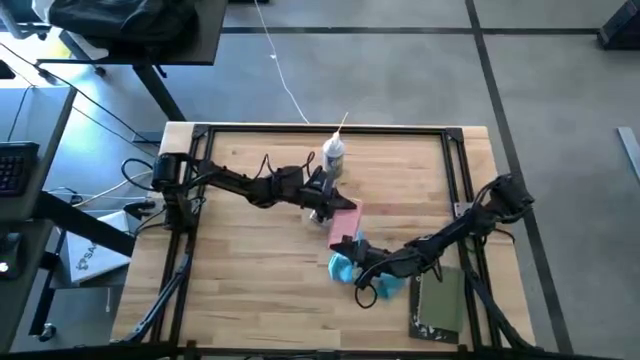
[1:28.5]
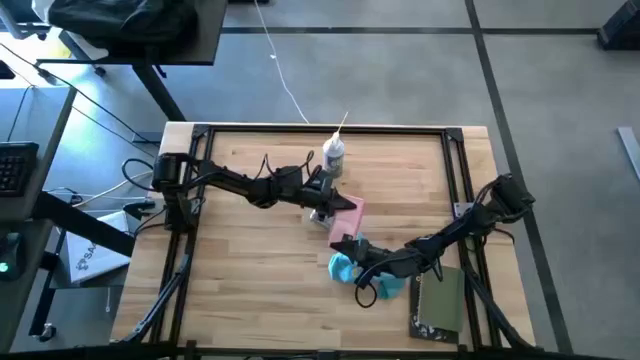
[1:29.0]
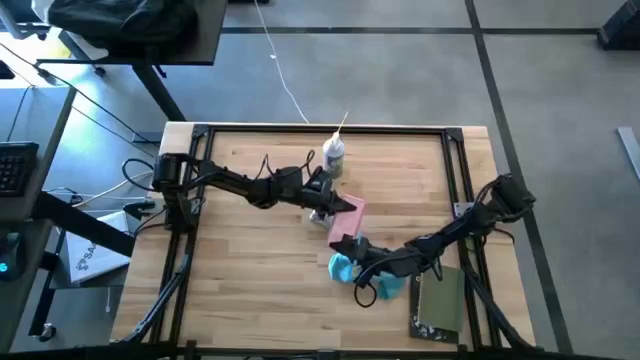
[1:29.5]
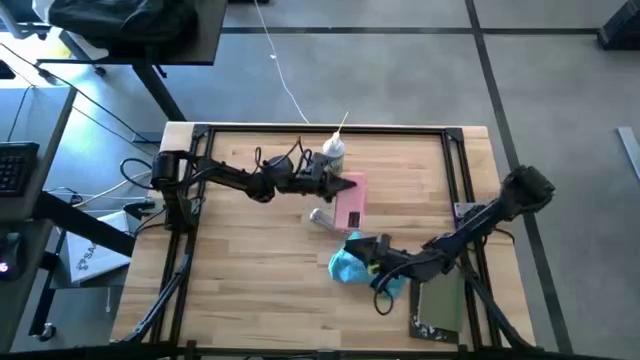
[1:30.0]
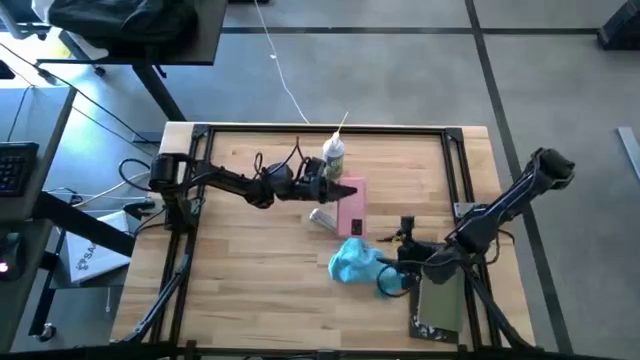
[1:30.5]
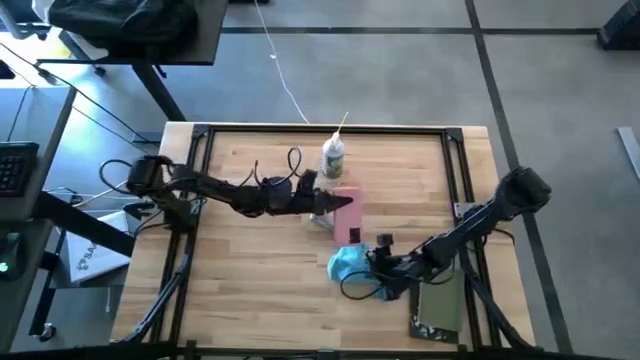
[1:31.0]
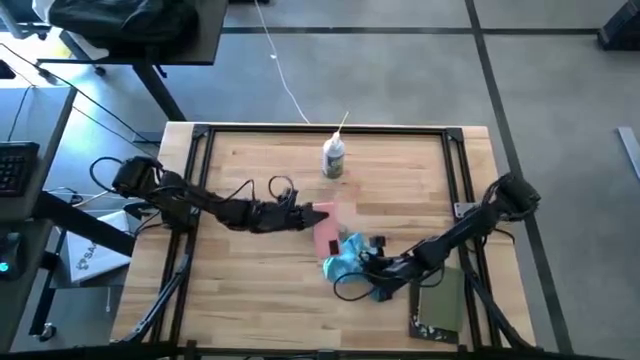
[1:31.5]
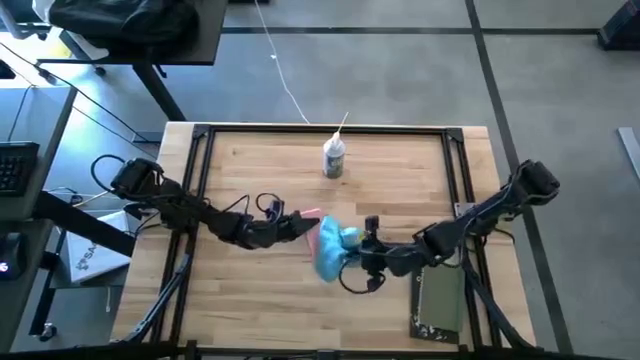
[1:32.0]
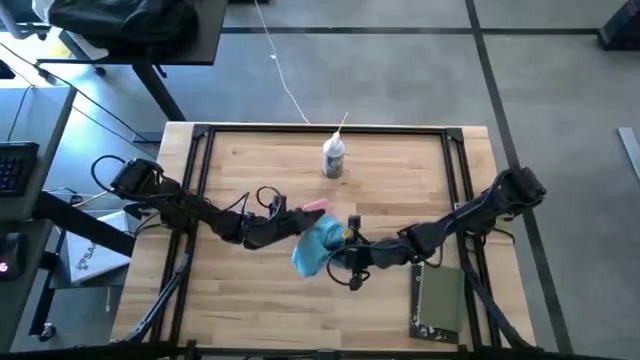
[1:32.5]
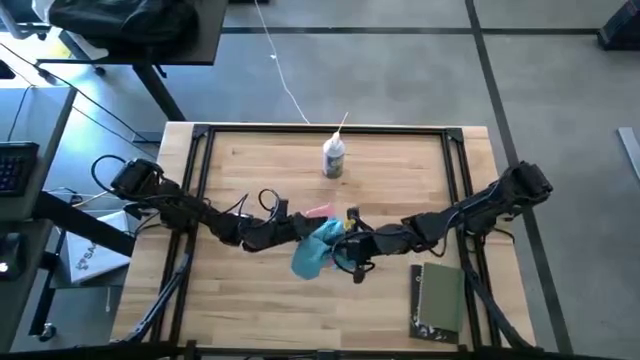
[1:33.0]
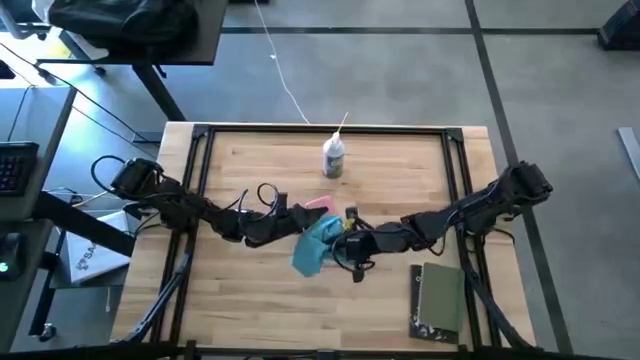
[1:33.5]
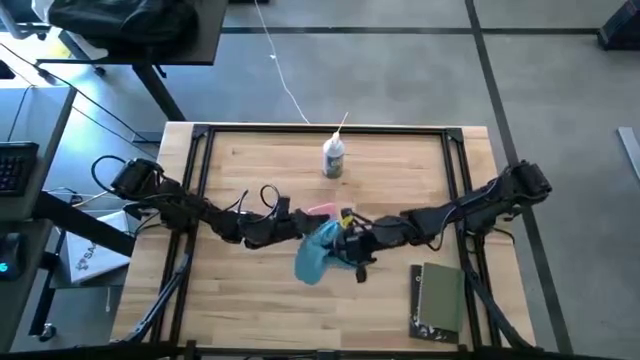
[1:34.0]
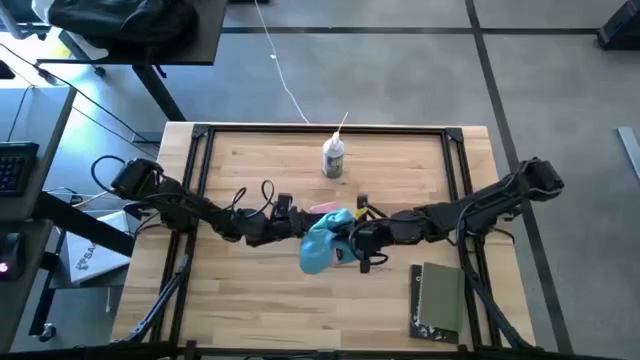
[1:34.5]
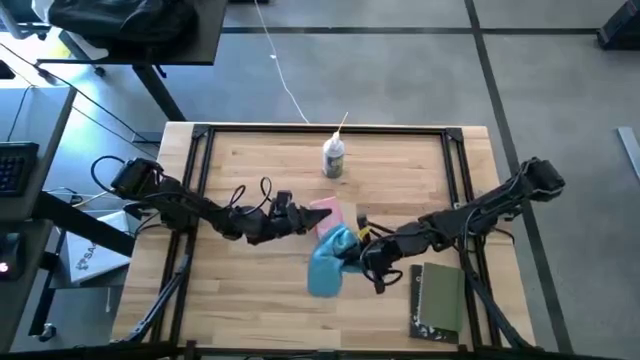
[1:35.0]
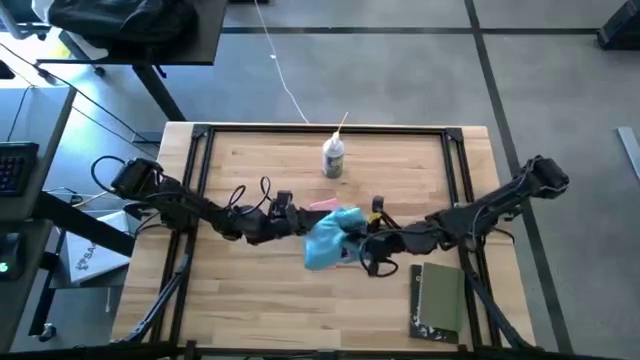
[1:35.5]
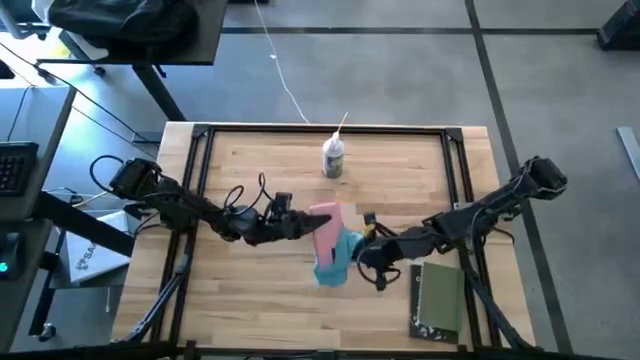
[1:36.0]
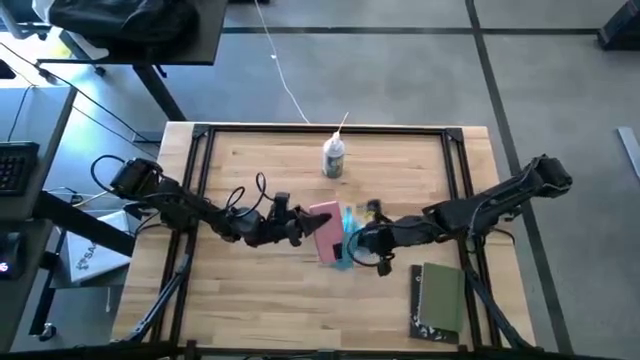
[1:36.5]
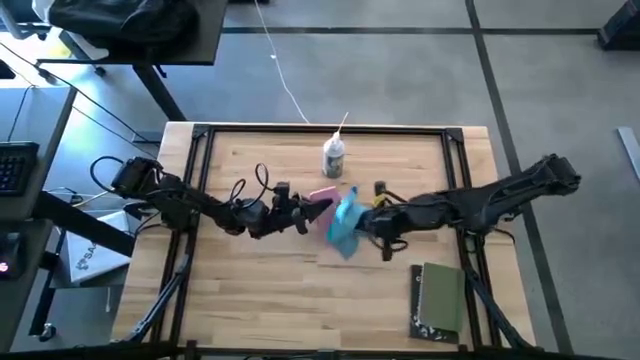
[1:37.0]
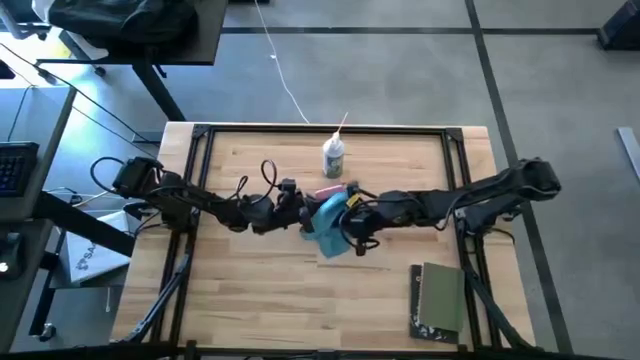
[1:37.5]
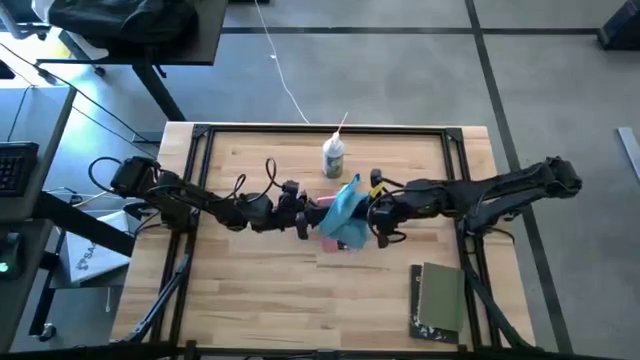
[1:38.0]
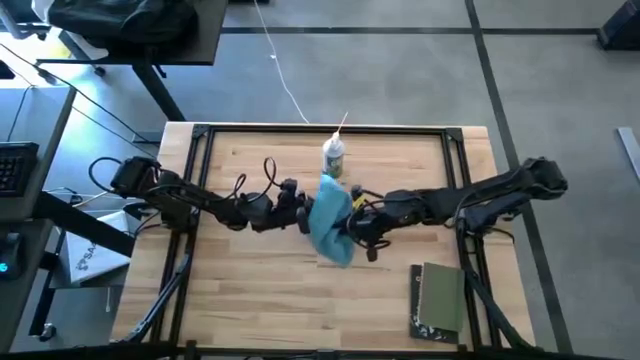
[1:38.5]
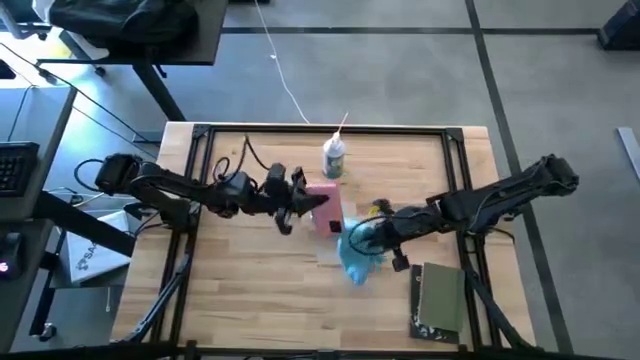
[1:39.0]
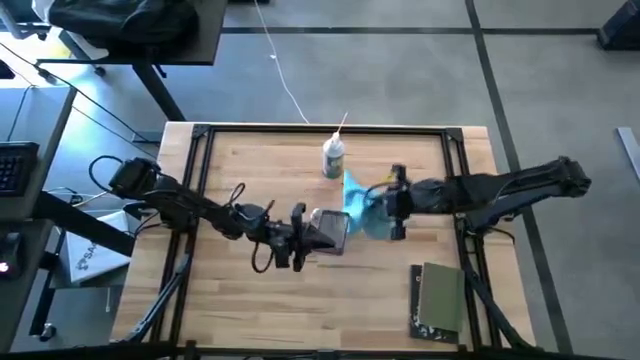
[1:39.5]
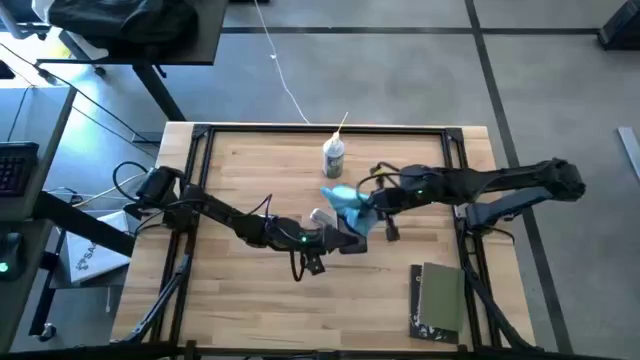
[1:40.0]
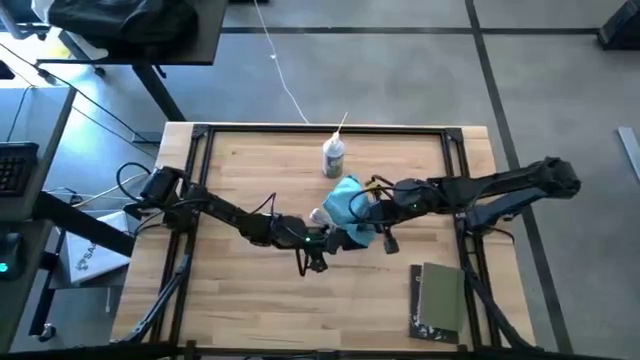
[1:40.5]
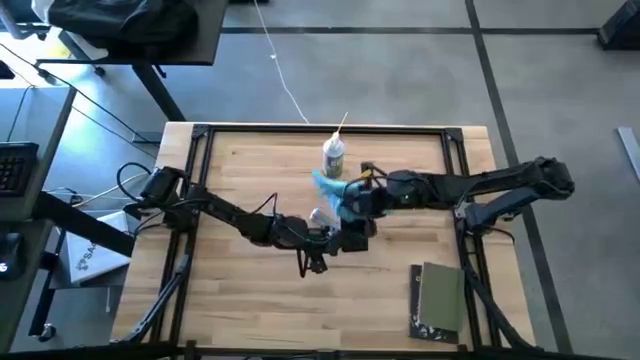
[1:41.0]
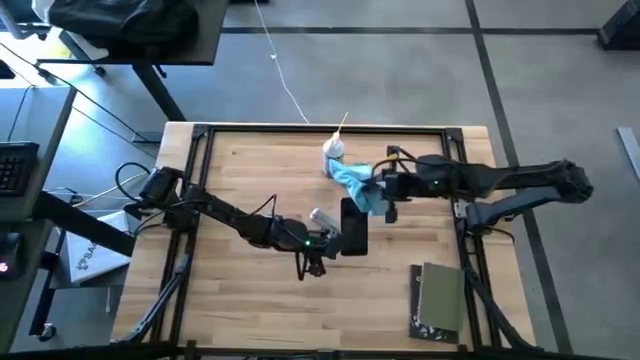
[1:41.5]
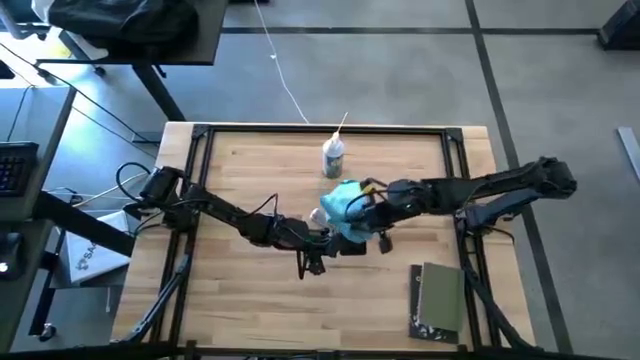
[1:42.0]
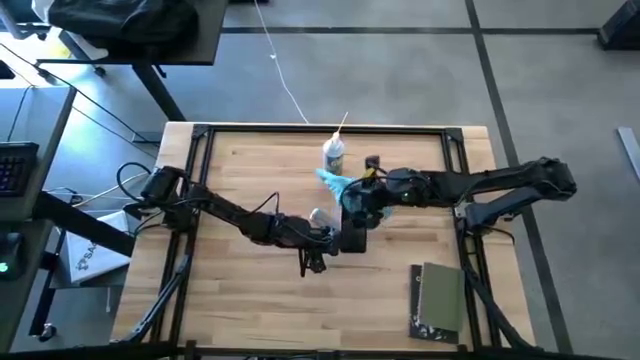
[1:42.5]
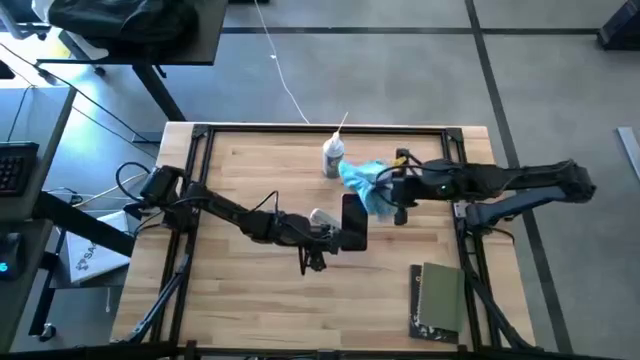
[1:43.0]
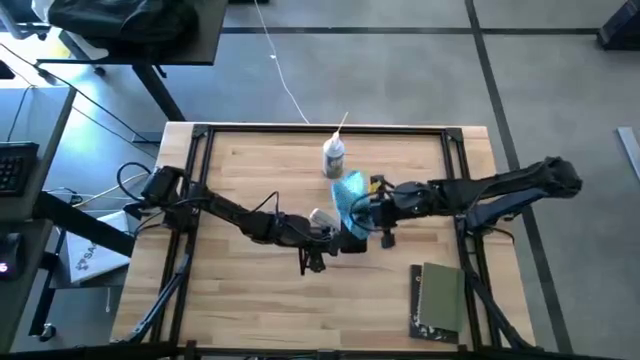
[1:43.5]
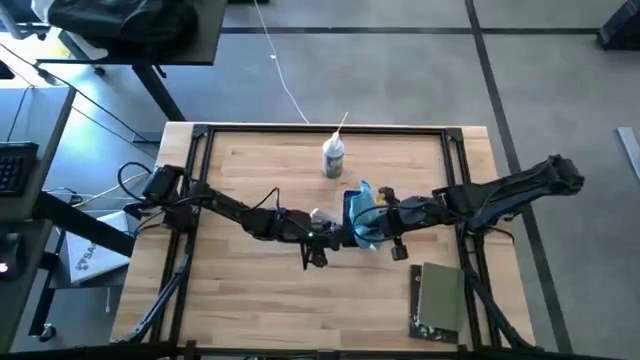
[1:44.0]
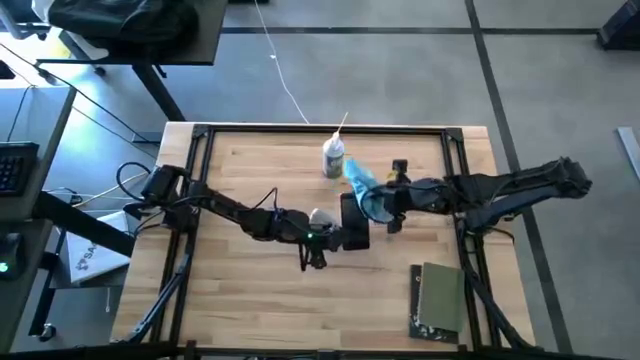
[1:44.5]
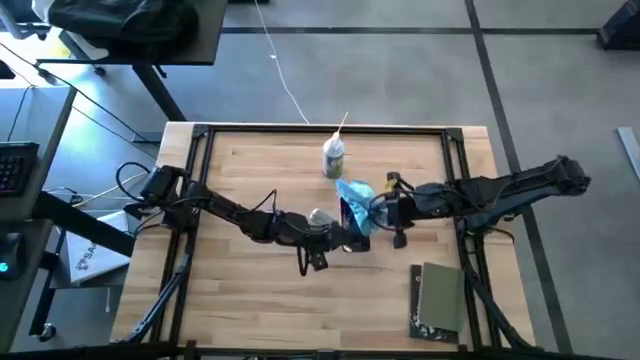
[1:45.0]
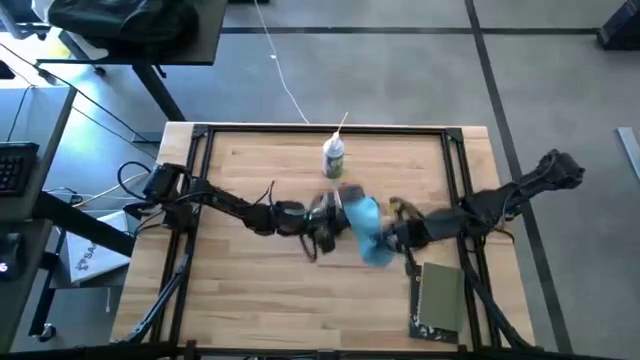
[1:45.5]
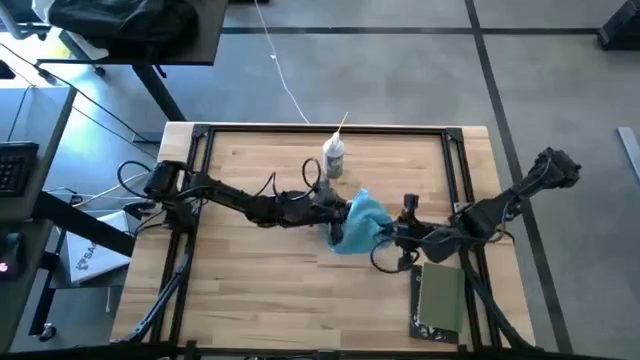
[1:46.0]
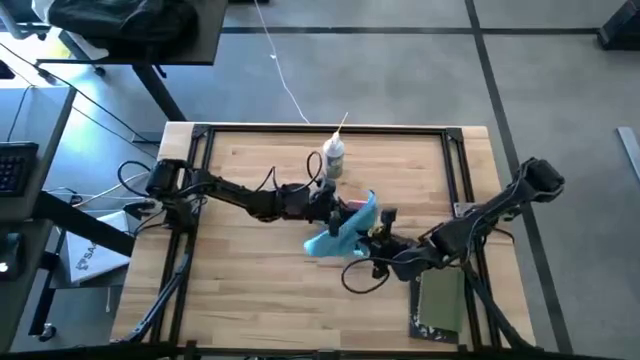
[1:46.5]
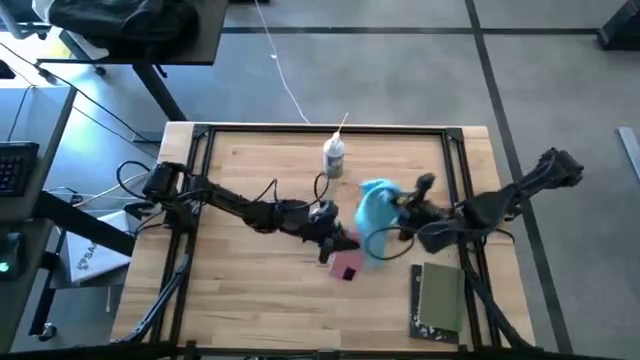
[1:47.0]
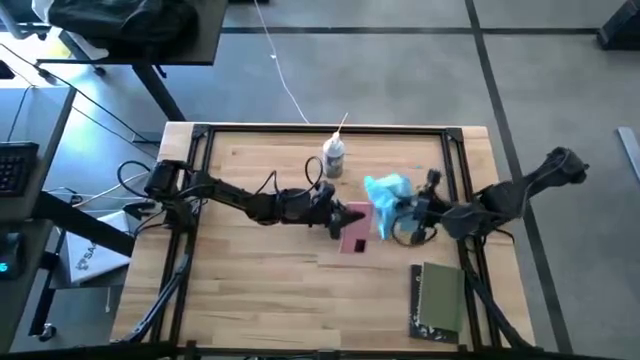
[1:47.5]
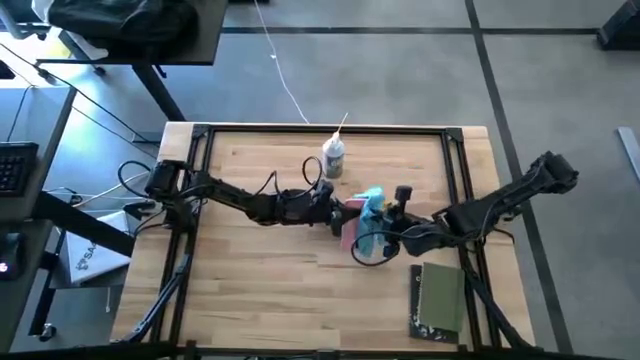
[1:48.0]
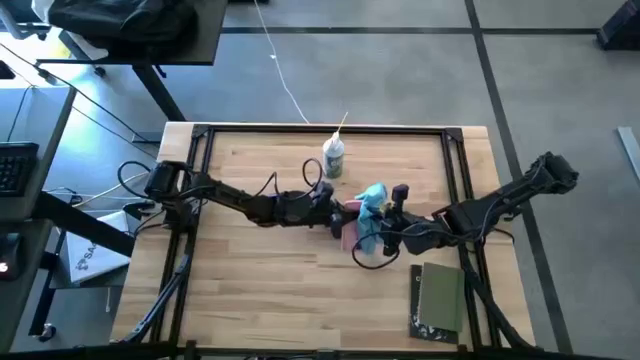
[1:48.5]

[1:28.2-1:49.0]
Task: Apply microfiber cloth
Wipe the pink phone with the blue microfiber cloth
